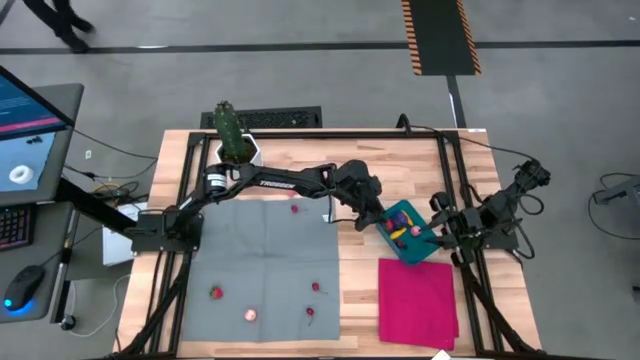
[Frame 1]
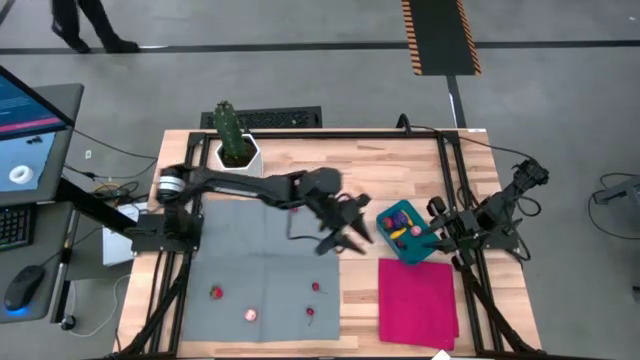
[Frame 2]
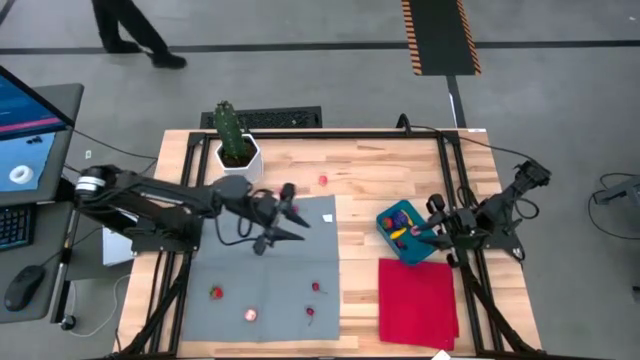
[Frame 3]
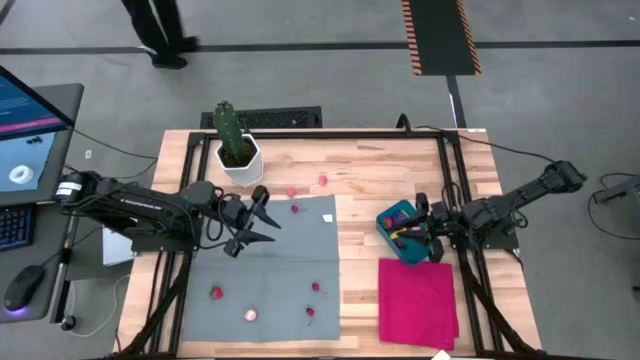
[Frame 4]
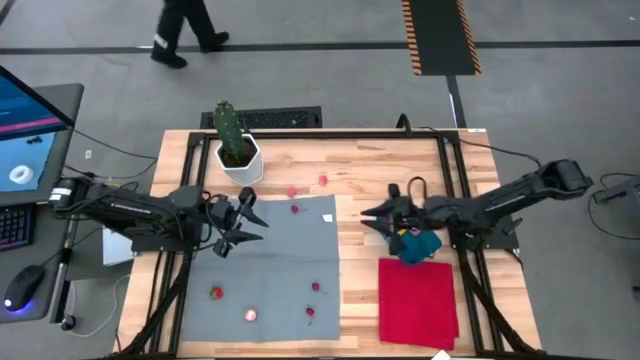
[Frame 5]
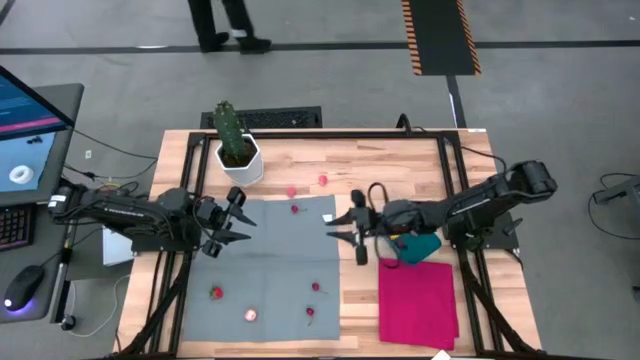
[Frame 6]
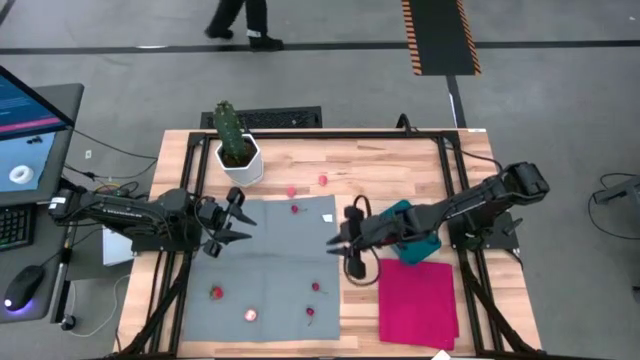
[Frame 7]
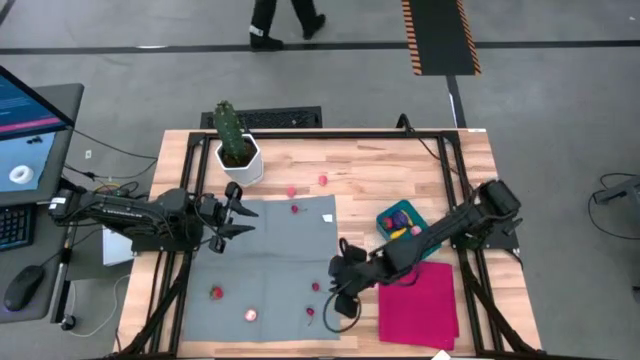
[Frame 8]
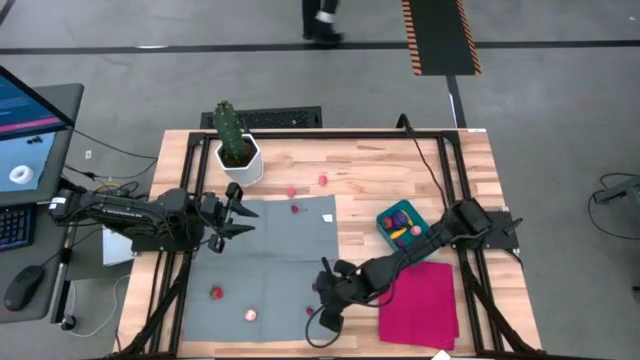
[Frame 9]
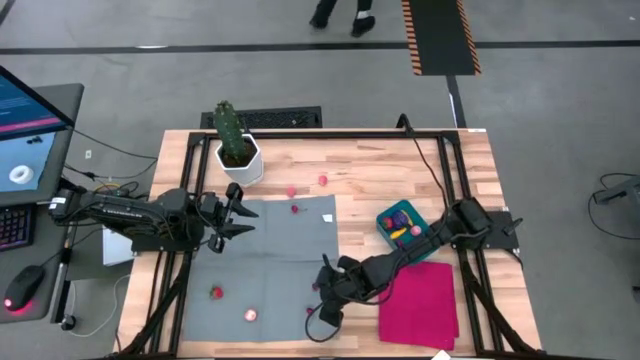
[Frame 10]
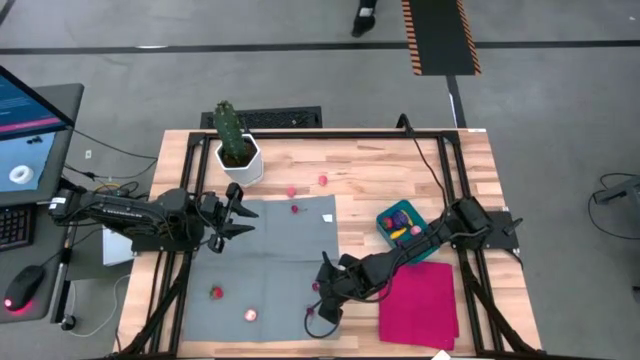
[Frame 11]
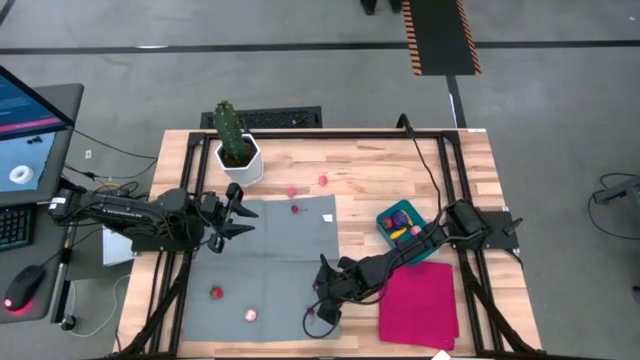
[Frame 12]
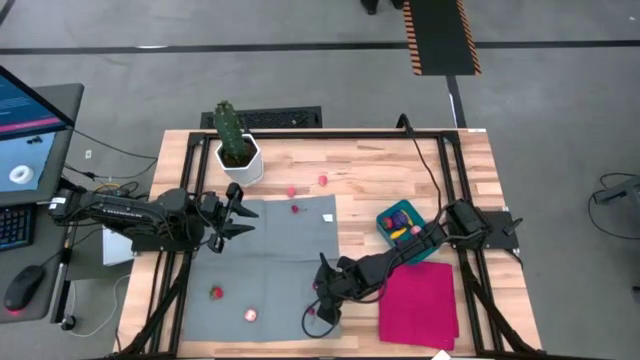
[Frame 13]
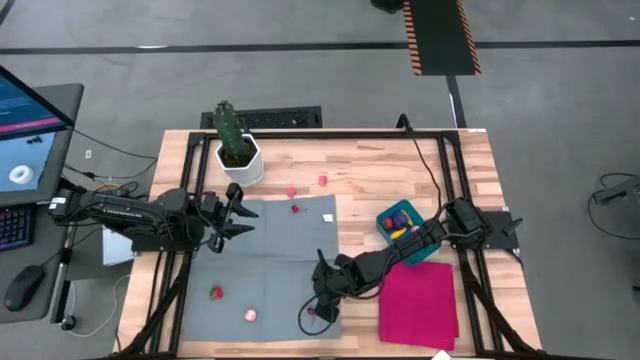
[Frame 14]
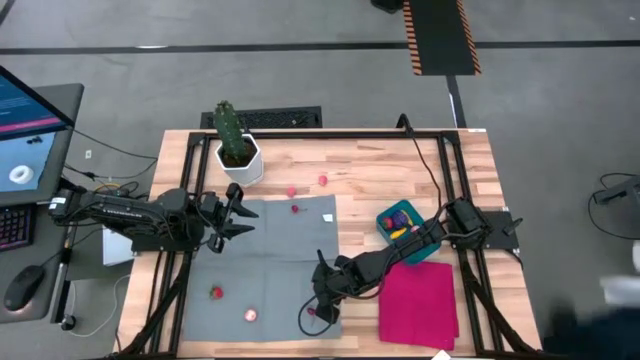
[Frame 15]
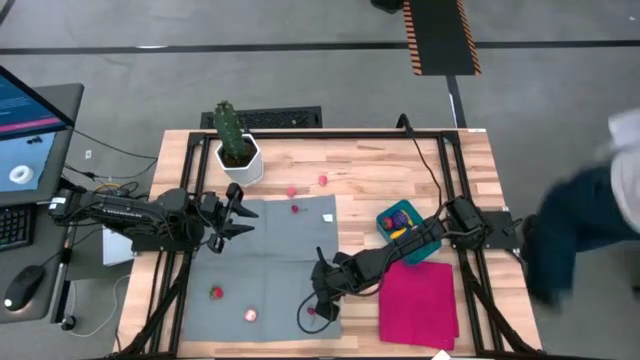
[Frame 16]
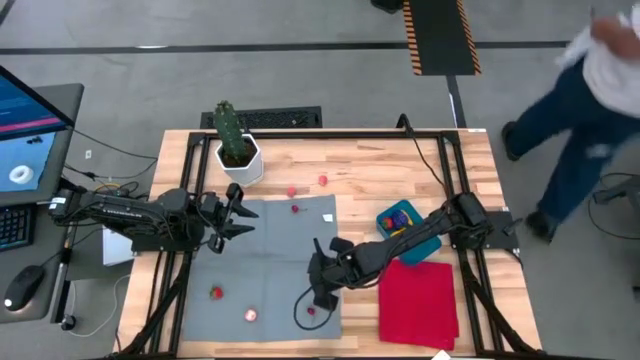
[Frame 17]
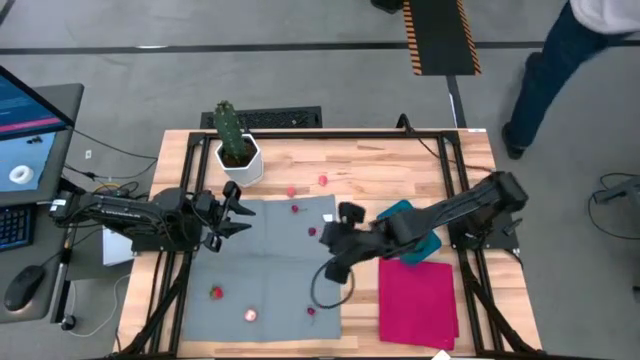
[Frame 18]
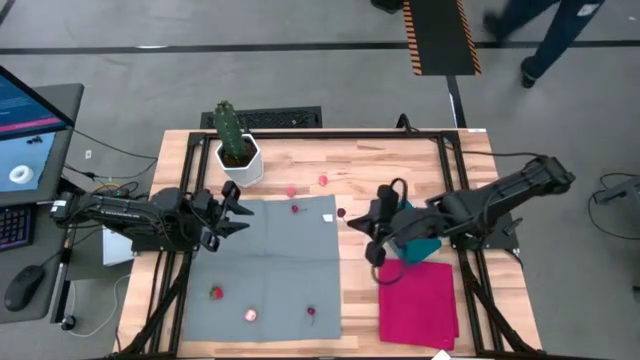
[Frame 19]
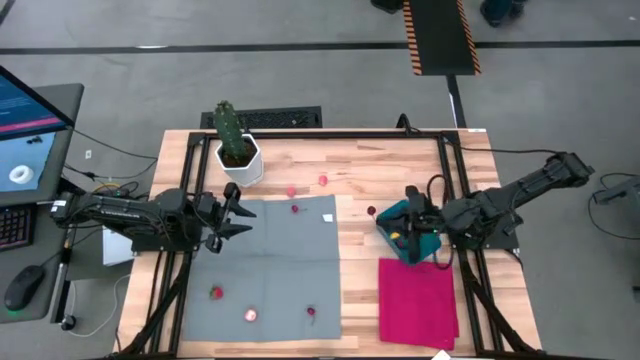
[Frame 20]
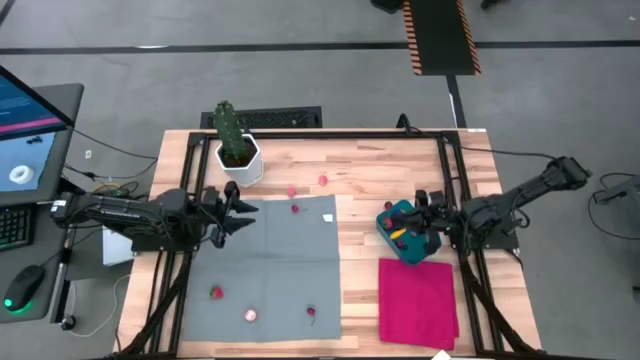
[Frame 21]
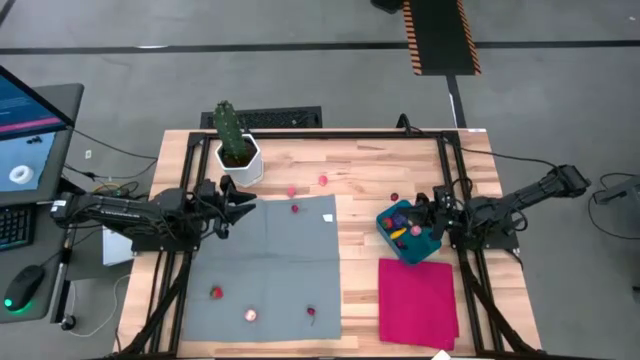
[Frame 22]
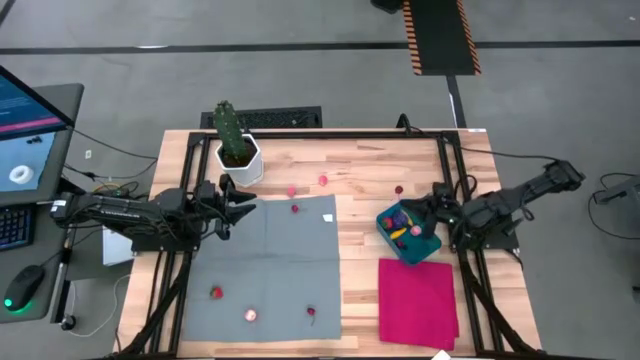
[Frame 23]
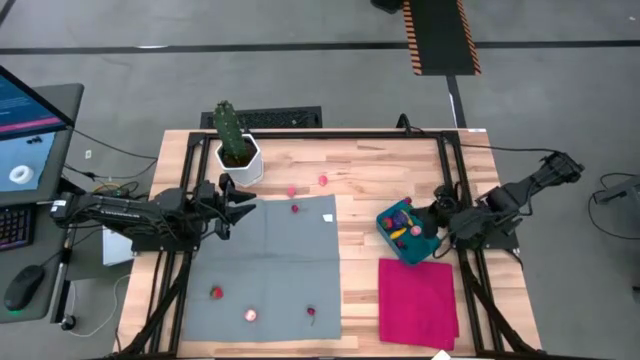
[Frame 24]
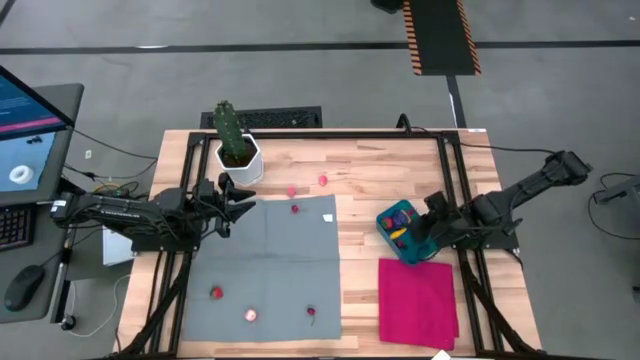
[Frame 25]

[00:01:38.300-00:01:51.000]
Task: Pick and placing Produce into tupperware
Put the red cherry into the blue bin

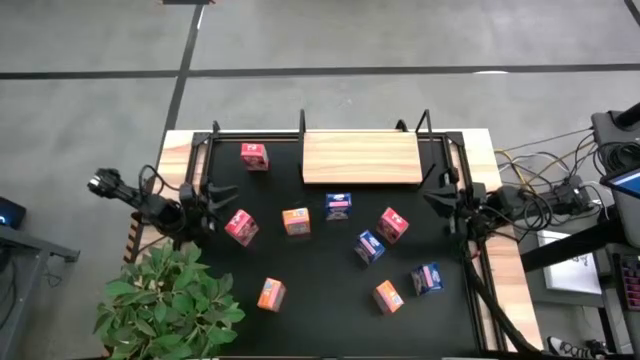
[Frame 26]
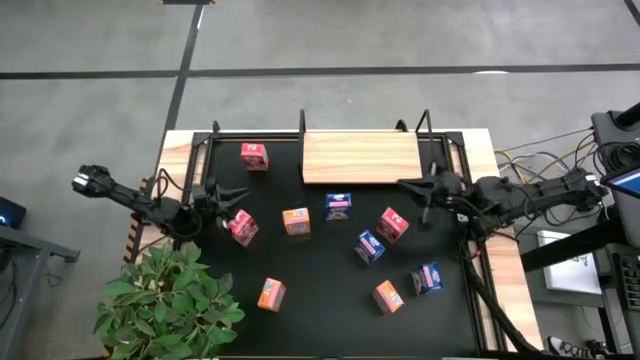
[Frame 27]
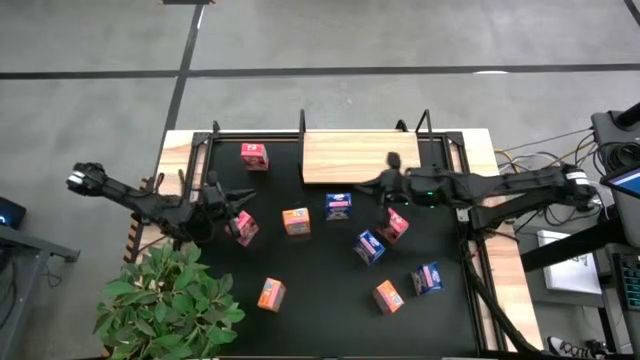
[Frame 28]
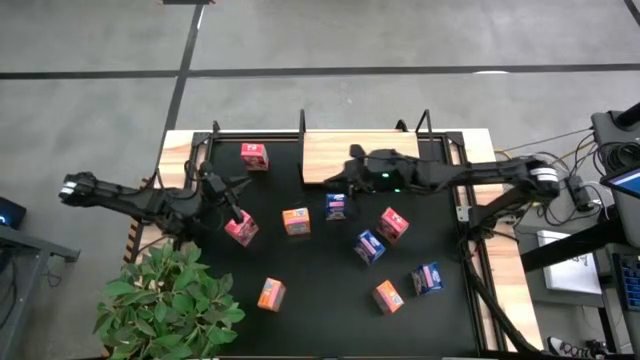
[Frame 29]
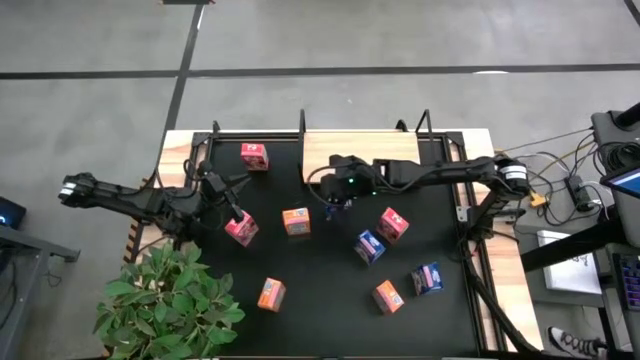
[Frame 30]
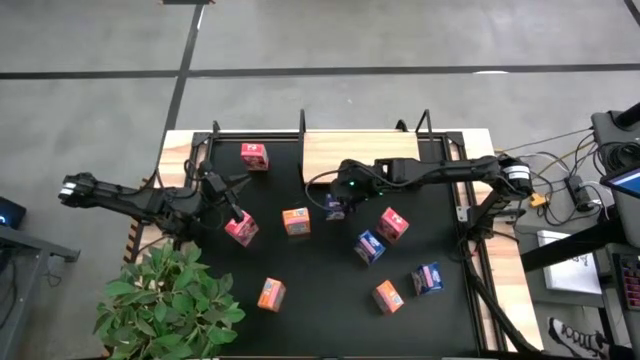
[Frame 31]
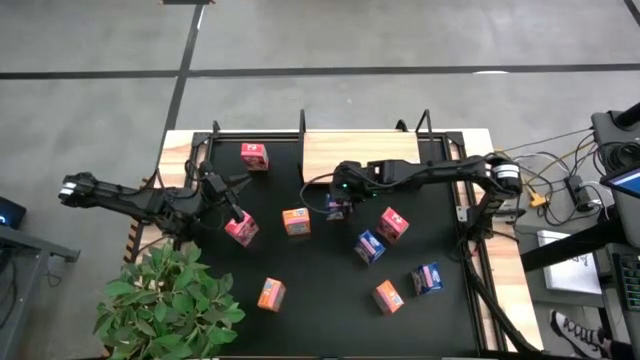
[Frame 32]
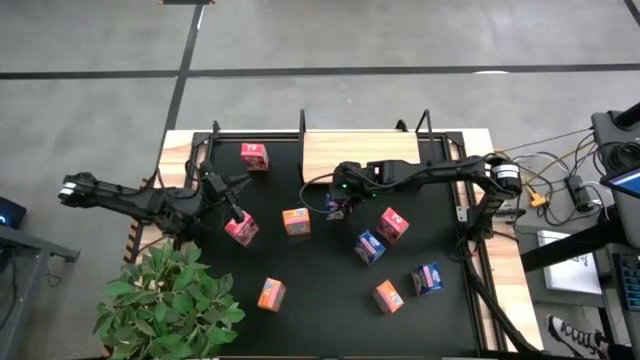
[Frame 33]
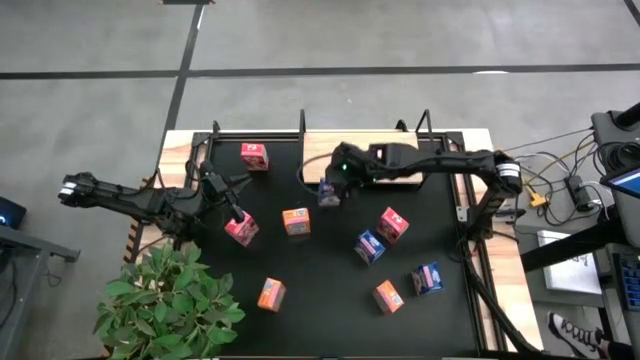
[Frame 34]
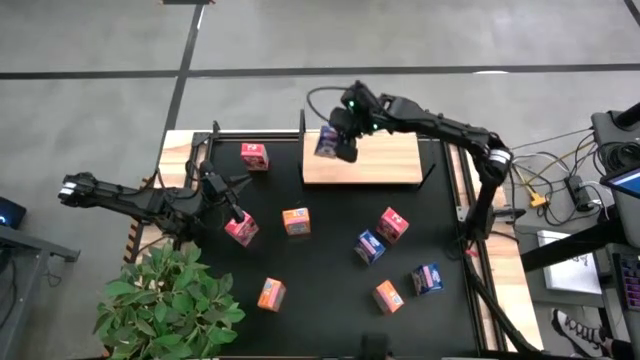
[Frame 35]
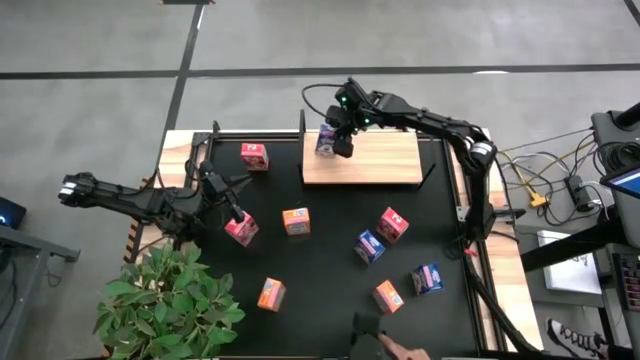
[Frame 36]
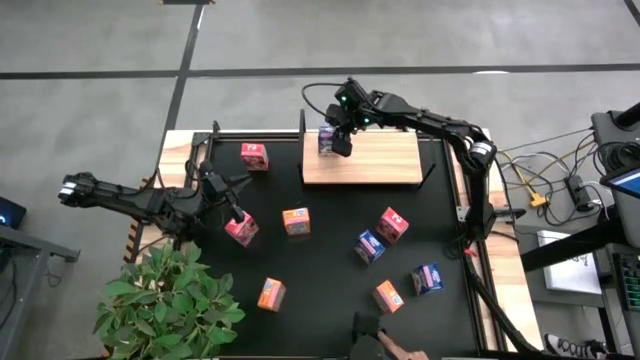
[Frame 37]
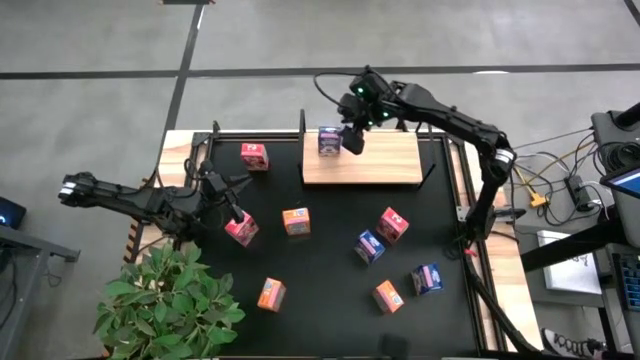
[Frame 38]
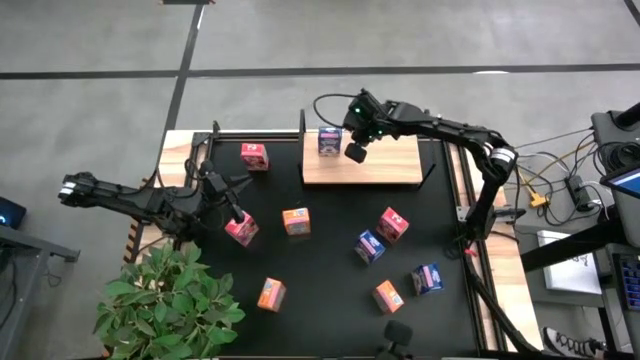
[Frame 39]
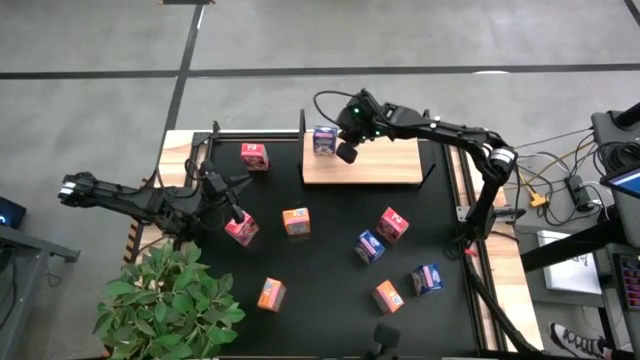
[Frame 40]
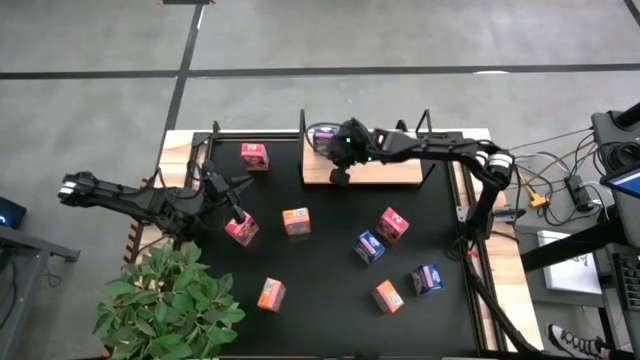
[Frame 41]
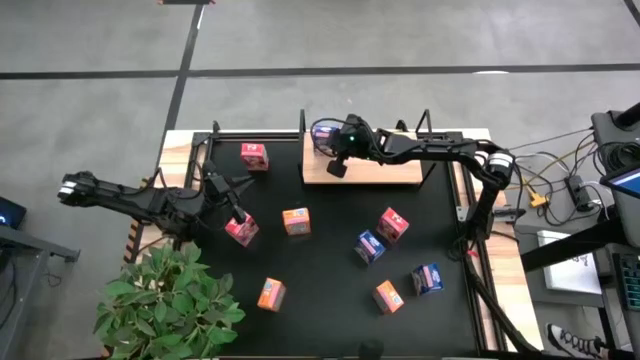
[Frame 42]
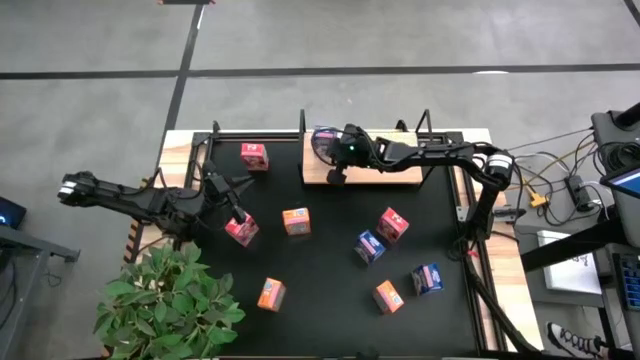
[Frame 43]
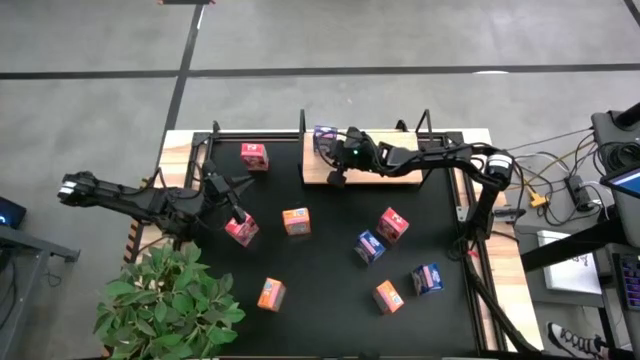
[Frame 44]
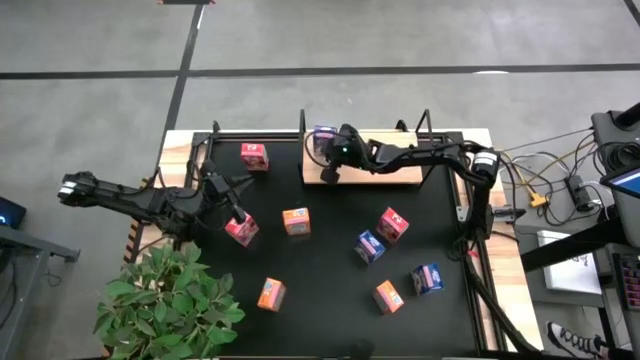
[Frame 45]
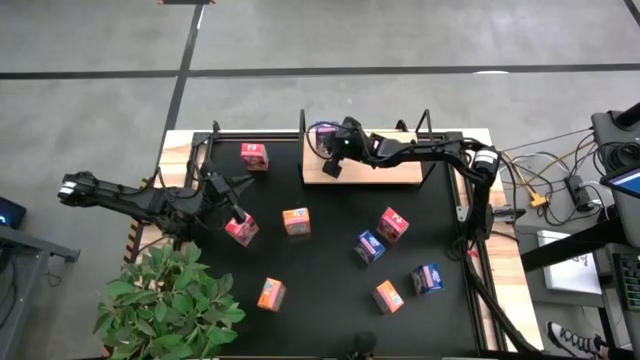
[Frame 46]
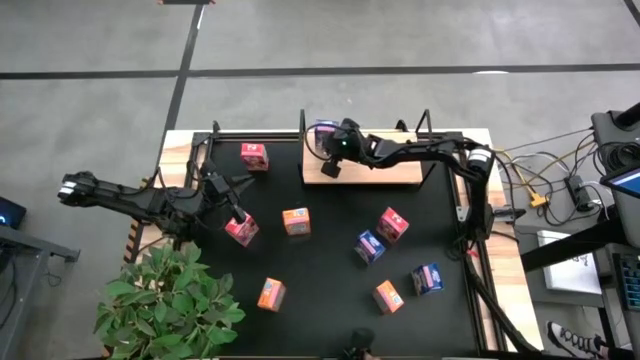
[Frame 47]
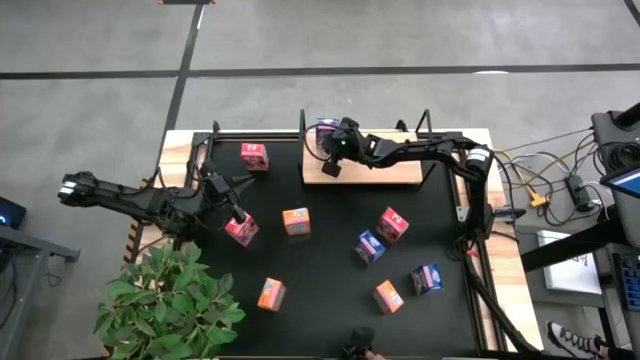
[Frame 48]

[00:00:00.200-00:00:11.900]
Task: Stack cereal on shelf
Put the top left blue cereal box on the shelf
